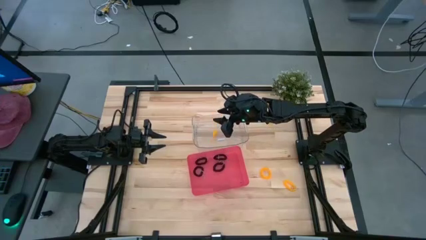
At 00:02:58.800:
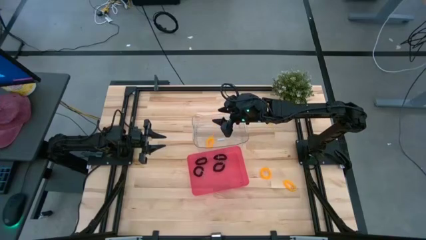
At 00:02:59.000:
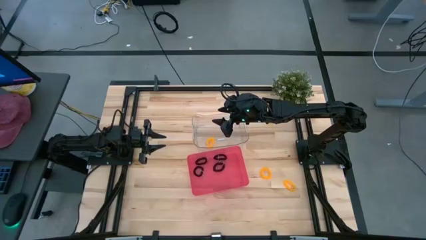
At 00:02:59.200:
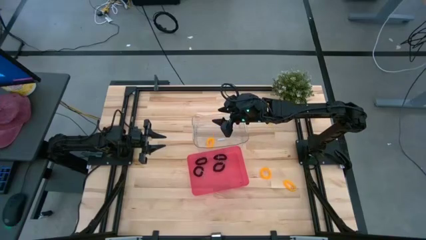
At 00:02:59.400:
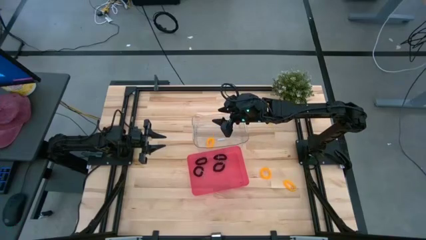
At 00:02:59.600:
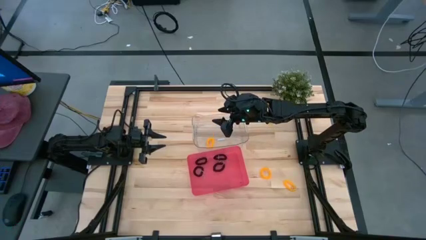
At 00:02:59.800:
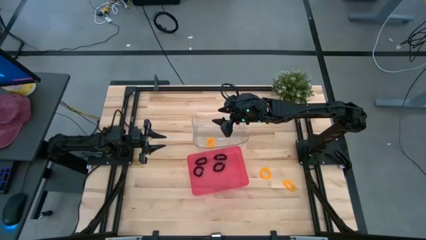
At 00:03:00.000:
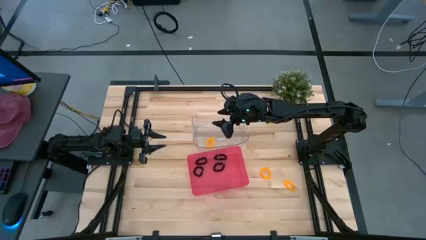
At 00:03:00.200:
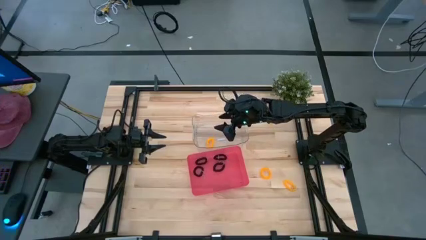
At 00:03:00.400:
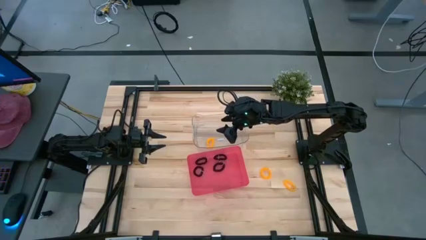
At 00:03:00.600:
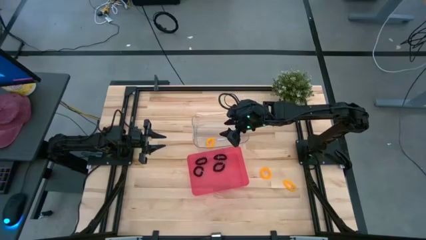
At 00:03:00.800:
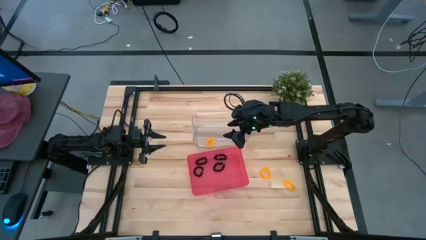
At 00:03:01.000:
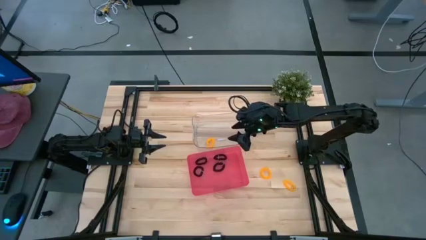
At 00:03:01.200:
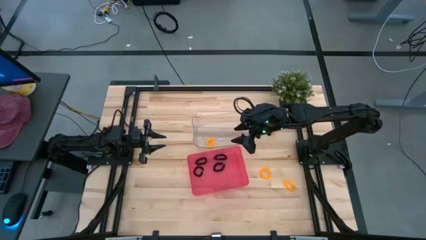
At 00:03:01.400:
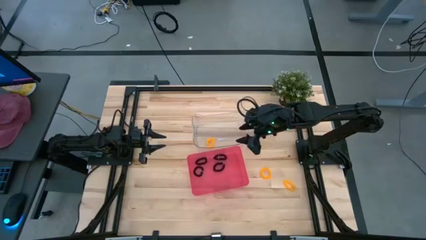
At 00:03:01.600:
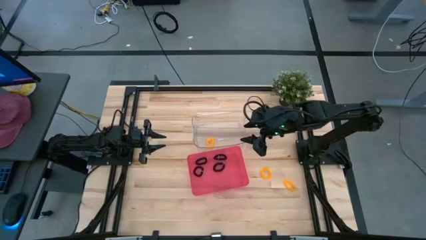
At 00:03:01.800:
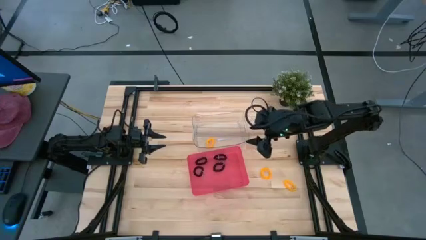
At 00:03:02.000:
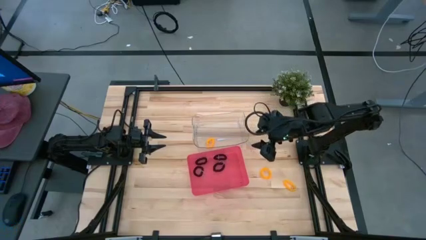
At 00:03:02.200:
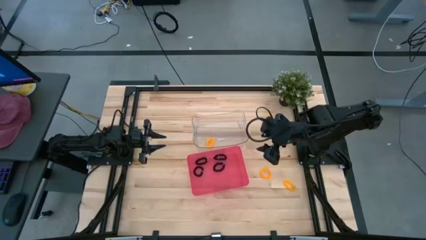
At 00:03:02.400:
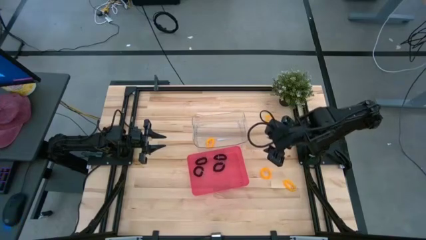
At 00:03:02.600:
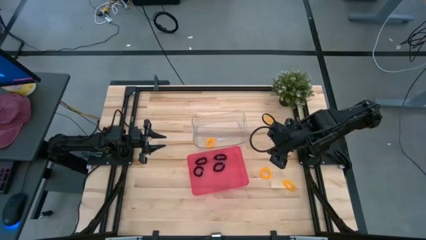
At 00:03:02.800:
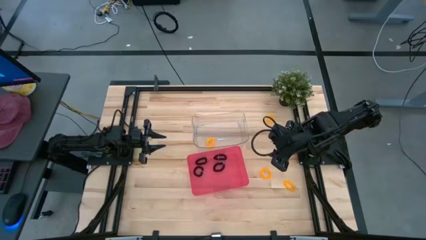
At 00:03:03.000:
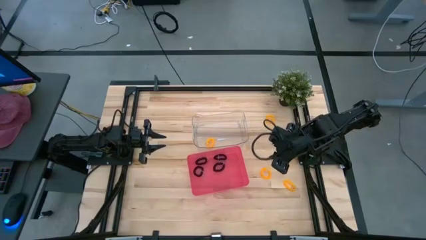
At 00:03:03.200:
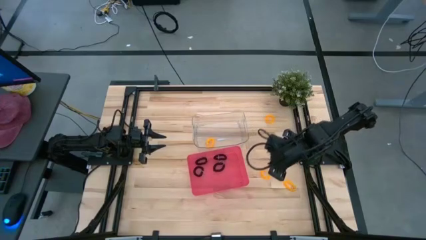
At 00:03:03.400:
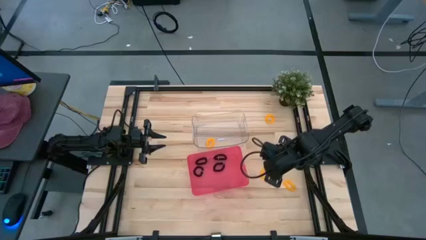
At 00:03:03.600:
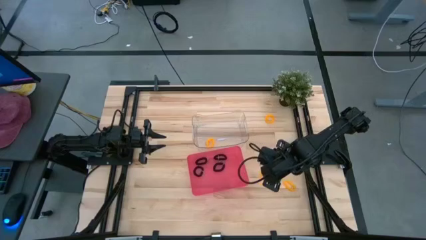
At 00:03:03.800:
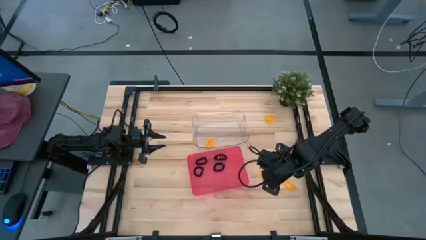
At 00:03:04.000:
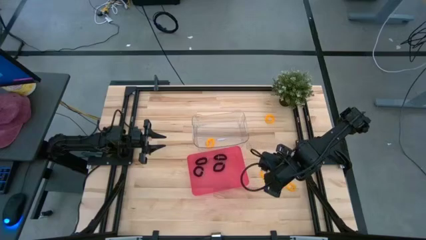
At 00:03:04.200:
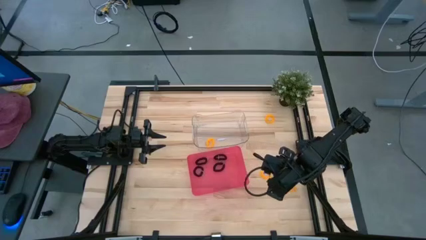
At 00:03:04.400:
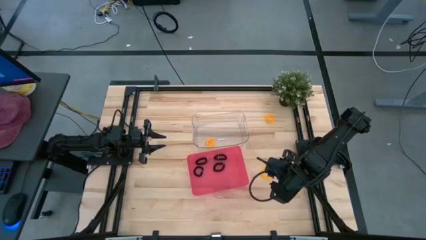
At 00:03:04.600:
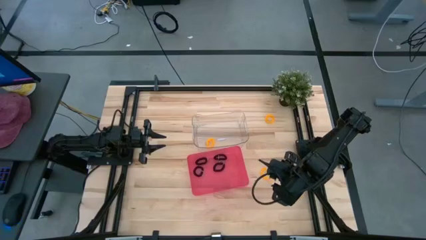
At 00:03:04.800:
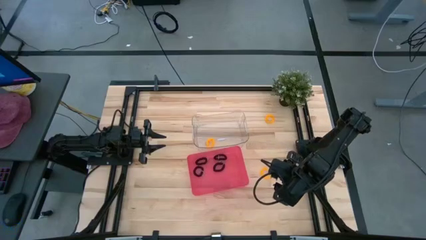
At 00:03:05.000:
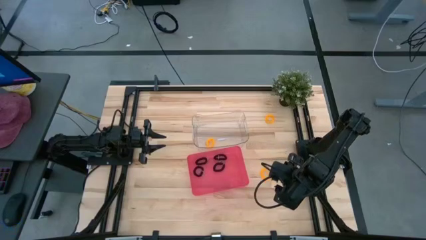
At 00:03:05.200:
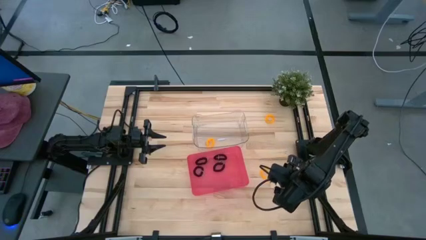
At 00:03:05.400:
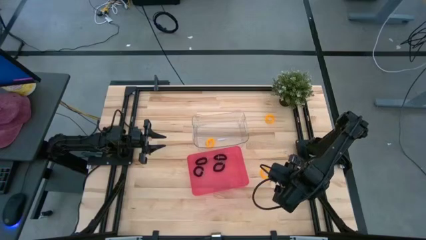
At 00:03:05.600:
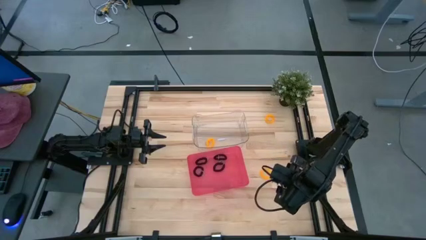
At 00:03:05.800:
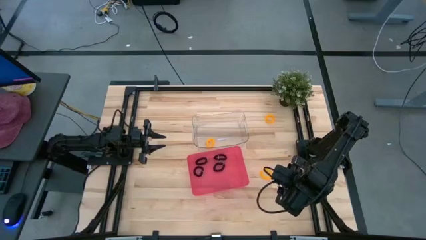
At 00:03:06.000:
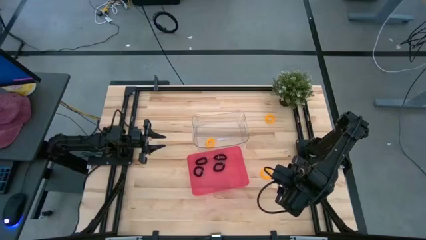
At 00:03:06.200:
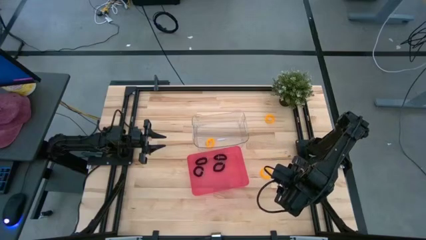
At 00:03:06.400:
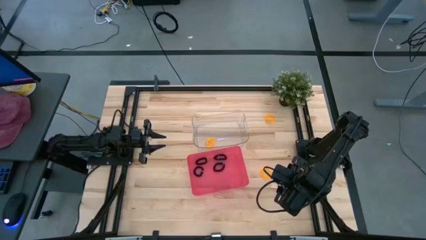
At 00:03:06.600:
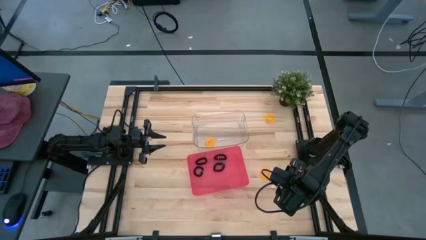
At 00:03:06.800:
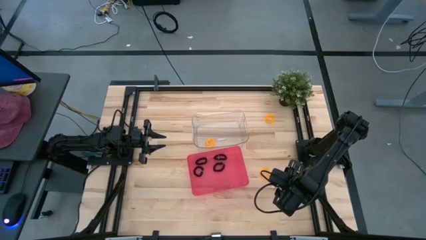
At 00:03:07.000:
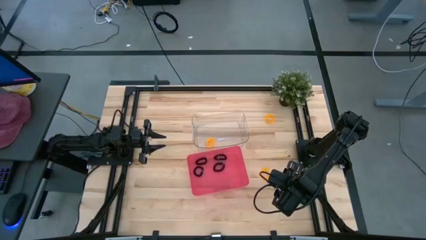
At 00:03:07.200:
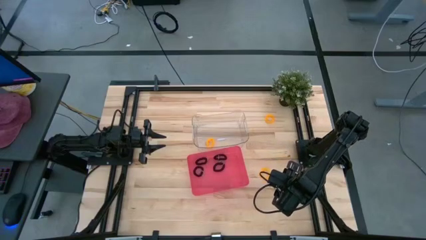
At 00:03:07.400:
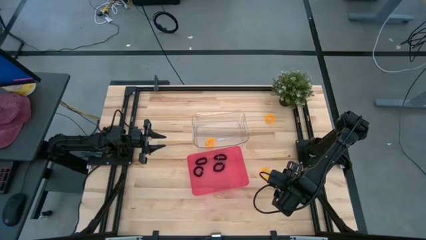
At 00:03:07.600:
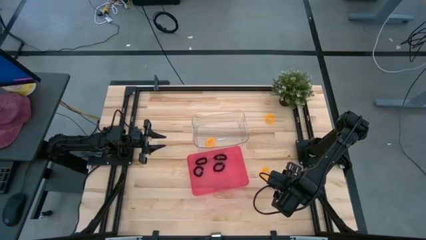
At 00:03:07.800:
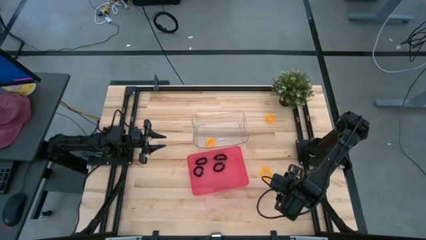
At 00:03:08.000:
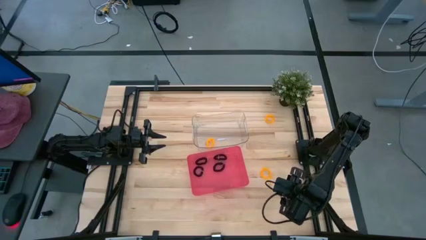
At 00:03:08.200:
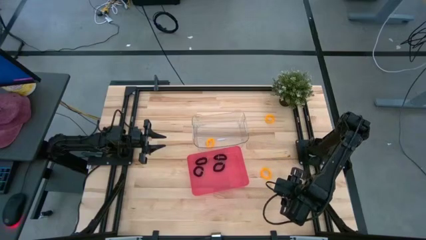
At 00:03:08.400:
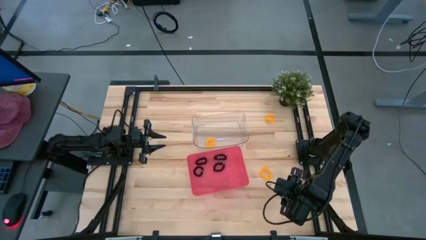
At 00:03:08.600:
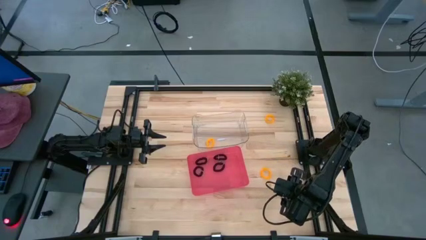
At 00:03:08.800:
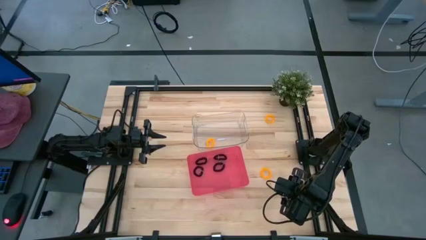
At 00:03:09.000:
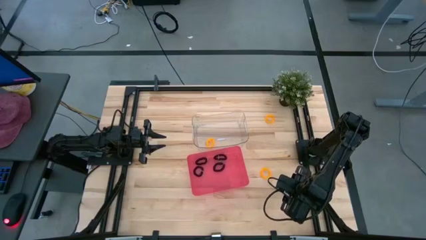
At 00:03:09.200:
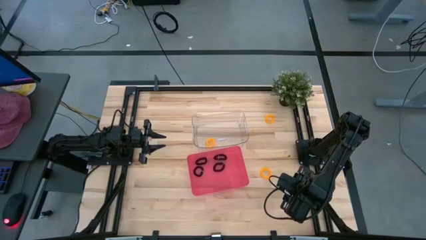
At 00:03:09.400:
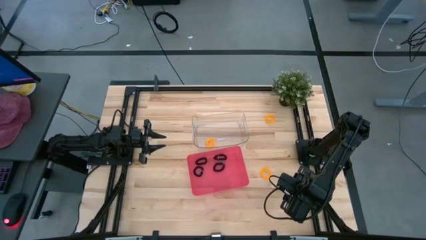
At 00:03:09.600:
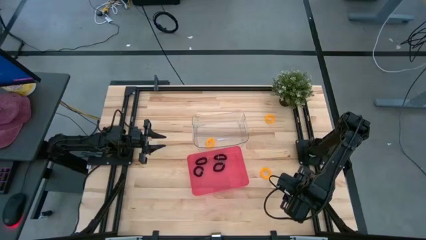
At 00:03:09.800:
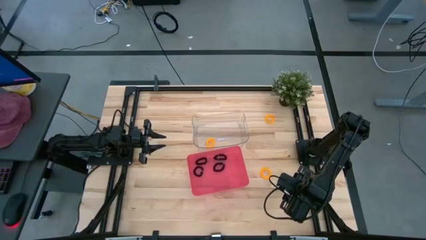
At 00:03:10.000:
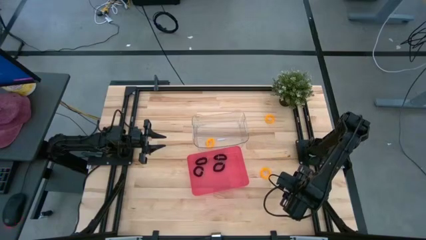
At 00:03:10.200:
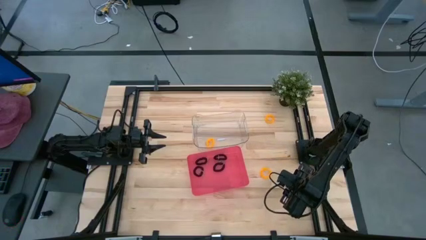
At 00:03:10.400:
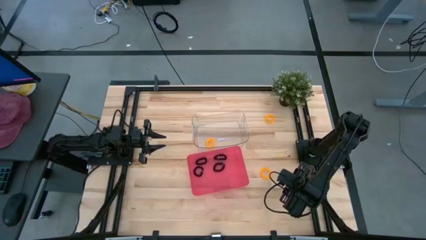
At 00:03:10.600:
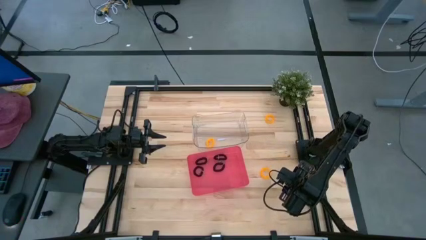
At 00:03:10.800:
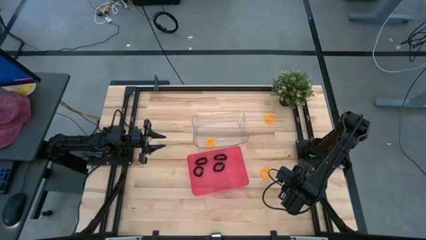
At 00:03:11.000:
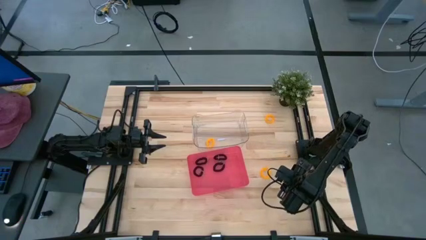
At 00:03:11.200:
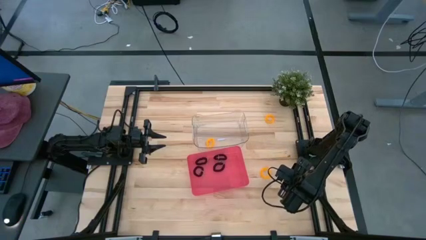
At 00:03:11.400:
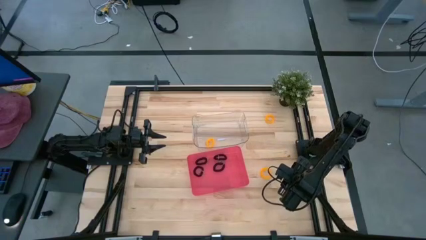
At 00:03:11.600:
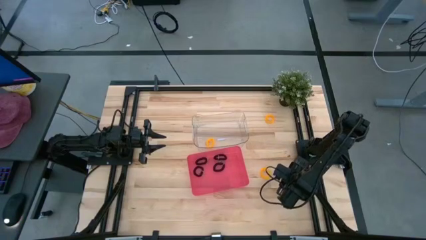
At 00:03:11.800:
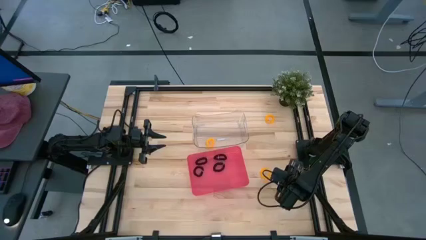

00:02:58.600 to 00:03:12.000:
Task: Sort spring keychains
Put the bottom yellow spring keychain into the transparent bin
